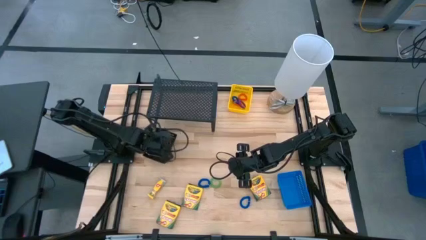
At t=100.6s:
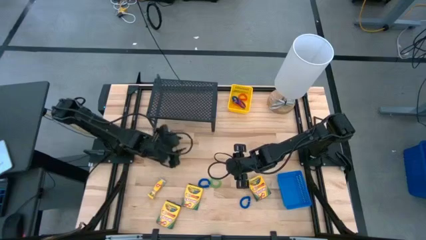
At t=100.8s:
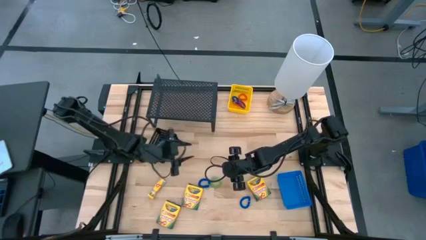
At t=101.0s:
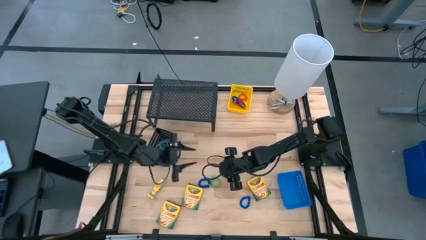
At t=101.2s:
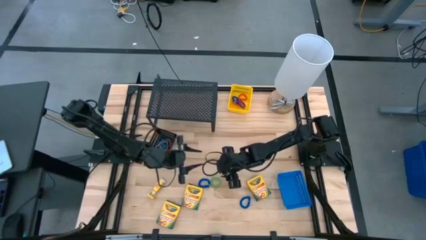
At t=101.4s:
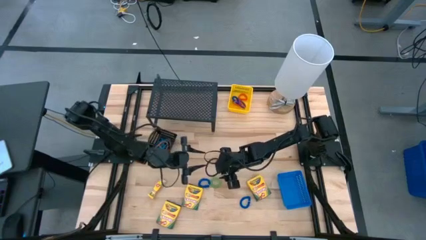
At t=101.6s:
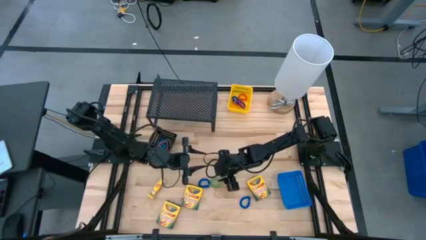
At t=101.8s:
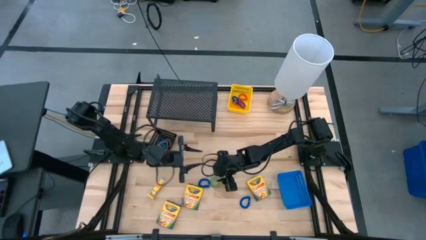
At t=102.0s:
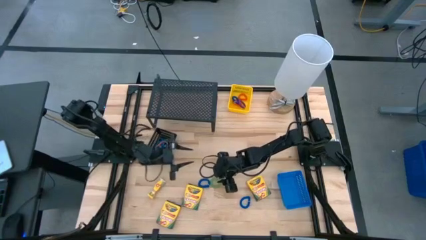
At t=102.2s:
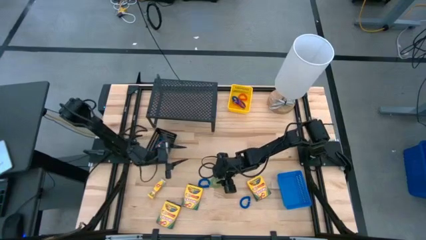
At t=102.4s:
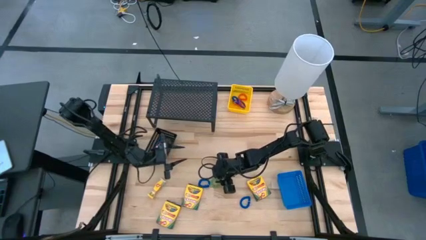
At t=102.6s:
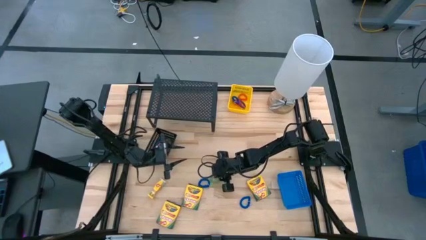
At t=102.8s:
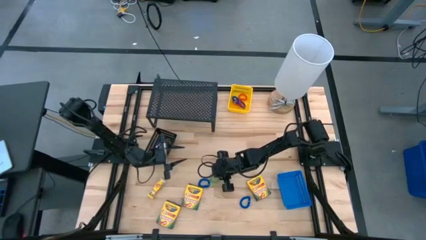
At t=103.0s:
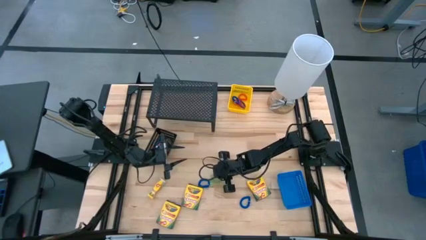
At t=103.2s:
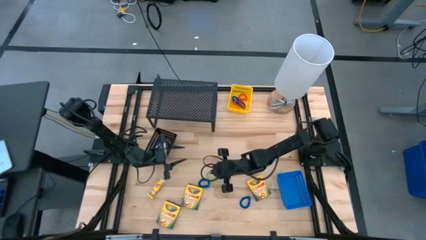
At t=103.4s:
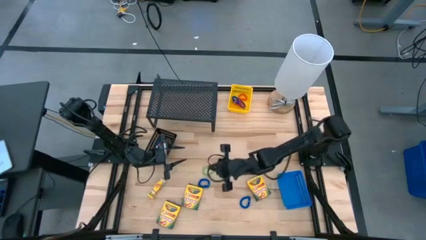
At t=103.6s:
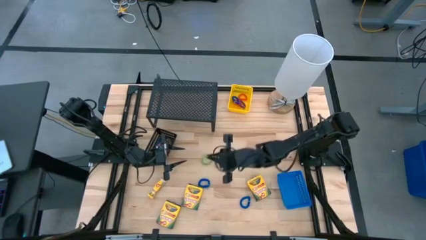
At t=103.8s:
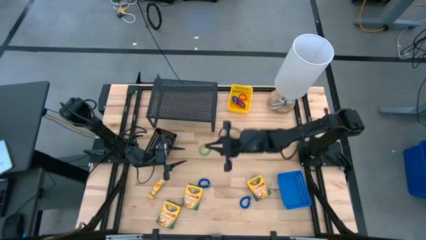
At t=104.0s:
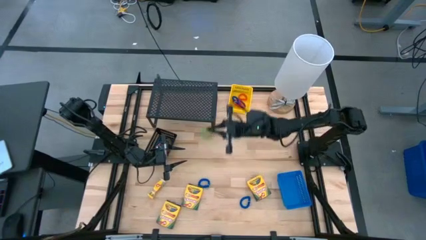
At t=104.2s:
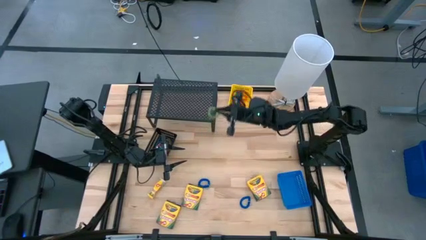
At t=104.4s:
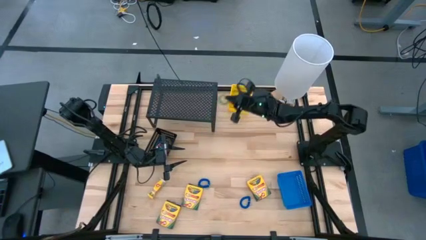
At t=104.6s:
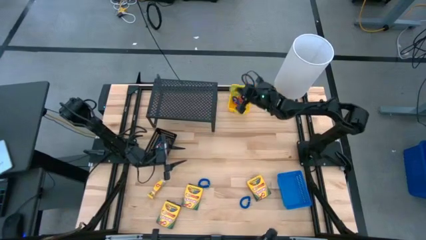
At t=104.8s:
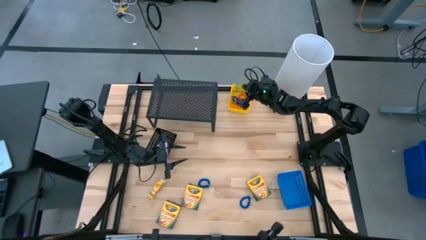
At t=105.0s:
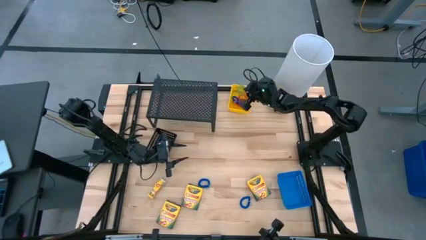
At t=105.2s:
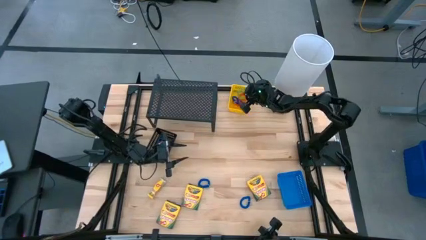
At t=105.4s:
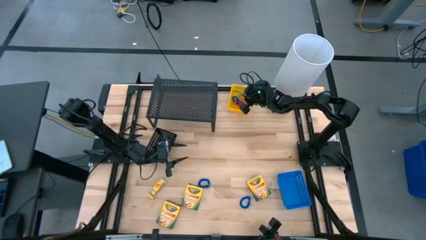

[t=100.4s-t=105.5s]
Task: Pick & Place Office Desk Supplies
Put the green spring keychain into the yellow bin

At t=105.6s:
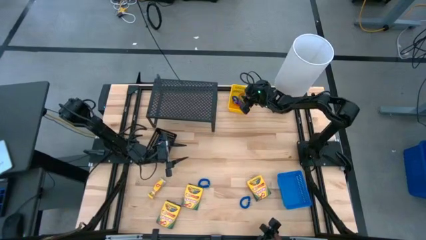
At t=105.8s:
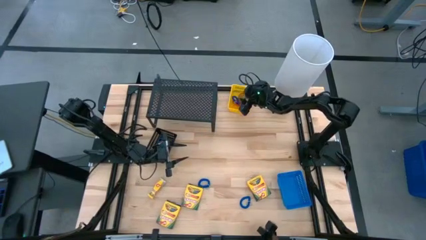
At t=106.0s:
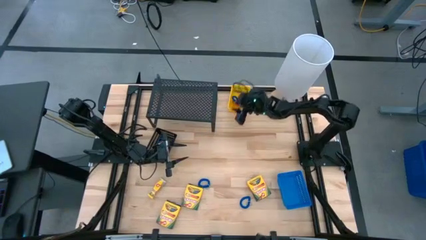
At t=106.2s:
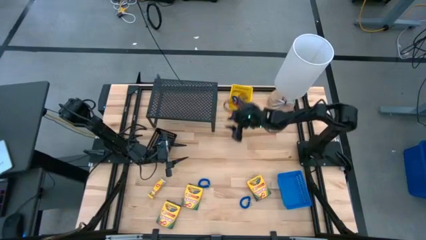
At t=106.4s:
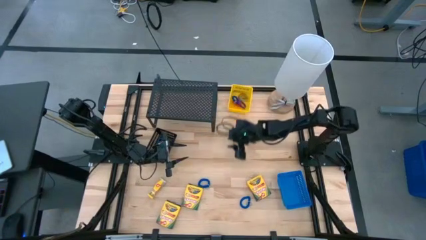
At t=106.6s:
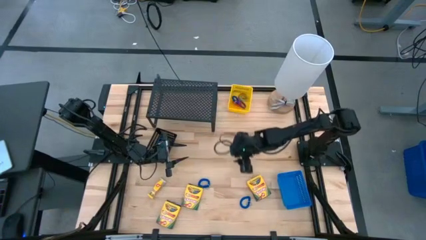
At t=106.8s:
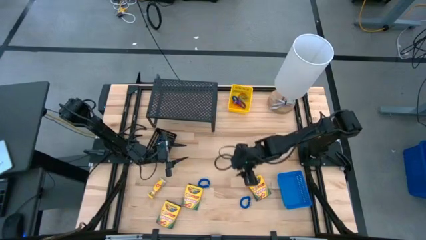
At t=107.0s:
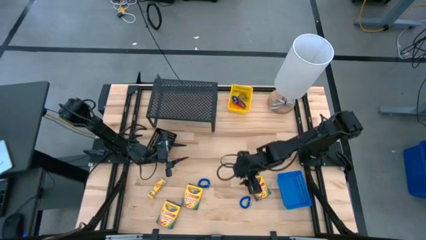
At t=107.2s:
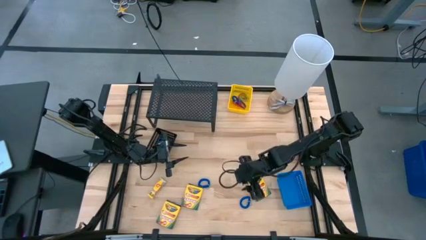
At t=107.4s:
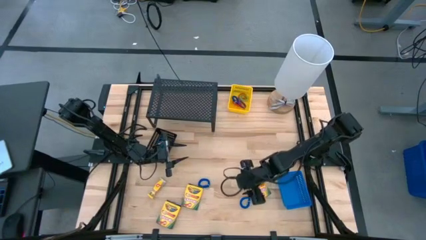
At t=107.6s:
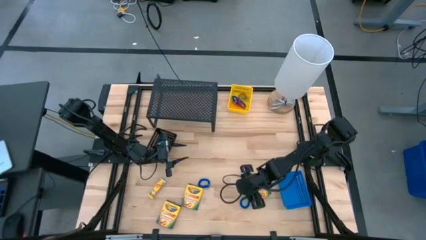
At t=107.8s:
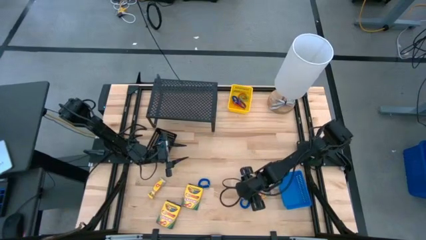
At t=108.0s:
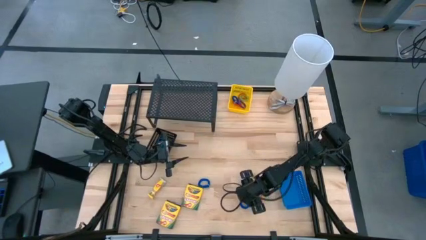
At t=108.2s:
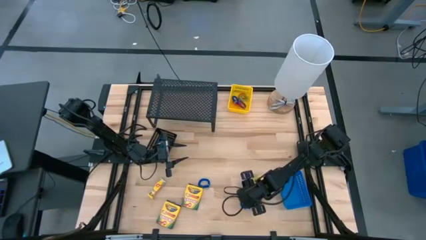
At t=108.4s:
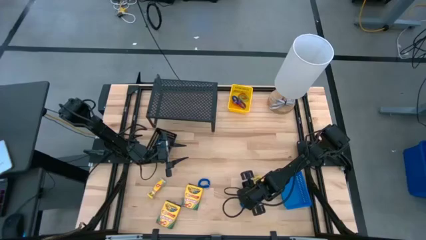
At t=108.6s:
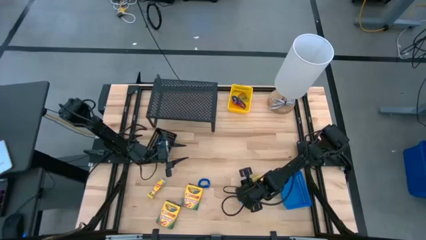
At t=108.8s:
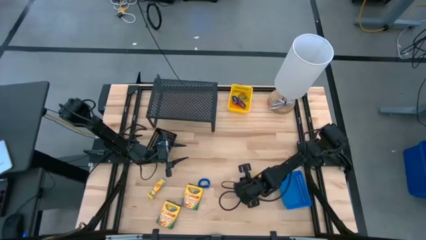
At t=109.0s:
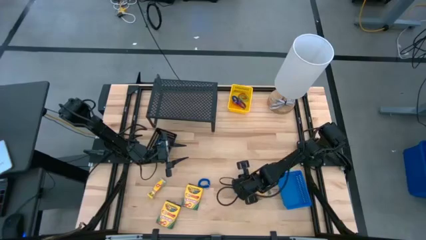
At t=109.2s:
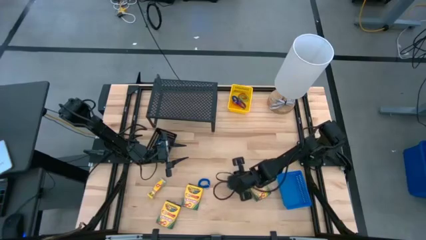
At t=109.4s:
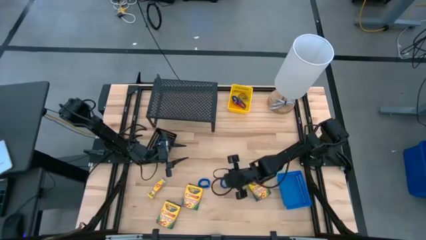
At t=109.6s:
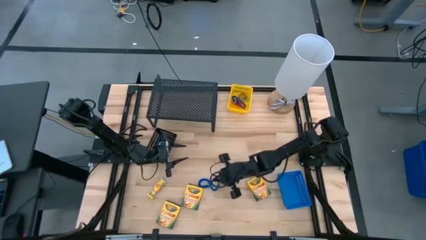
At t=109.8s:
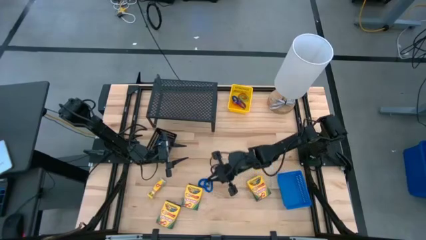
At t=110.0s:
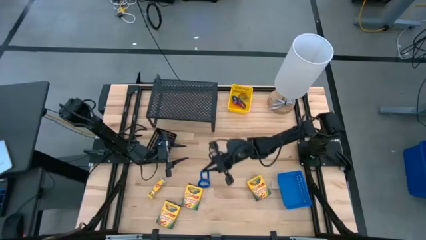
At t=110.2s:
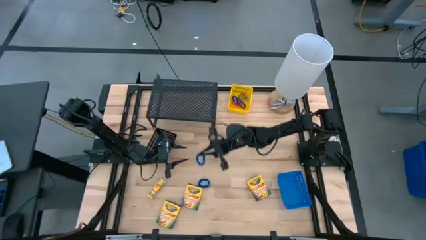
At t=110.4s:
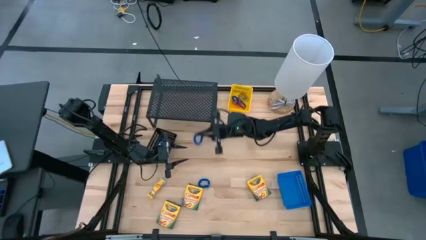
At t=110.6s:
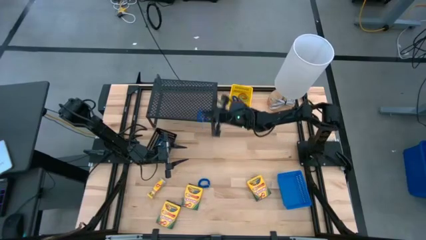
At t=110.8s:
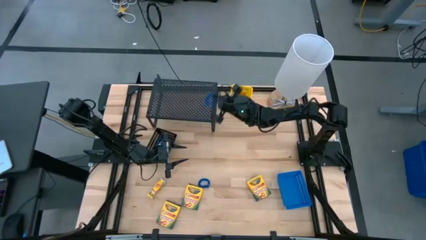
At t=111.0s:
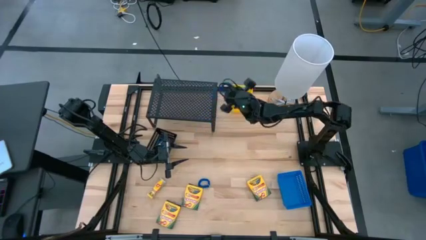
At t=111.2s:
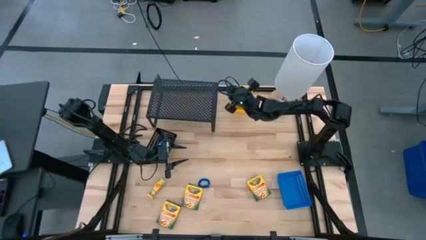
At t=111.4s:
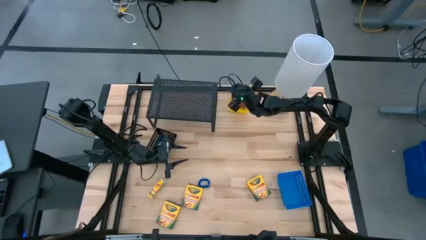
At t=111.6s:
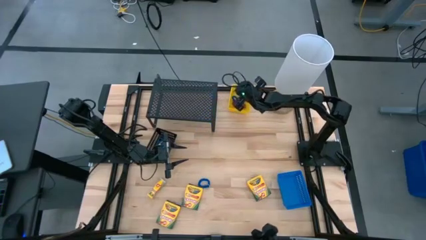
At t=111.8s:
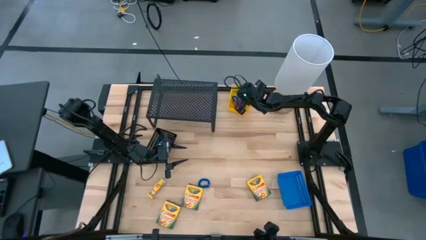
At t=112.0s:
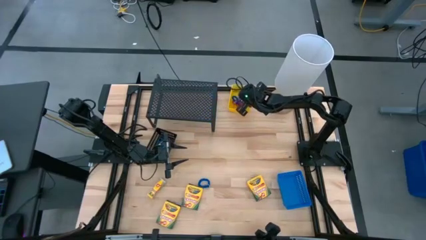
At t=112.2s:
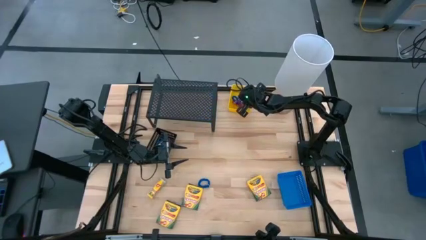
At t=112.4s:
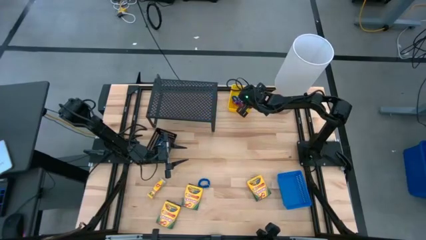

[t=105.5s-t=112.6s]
Put the bottom blue spring keychain into the yellow bin

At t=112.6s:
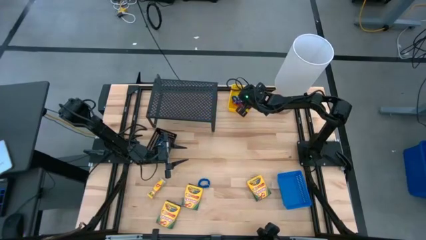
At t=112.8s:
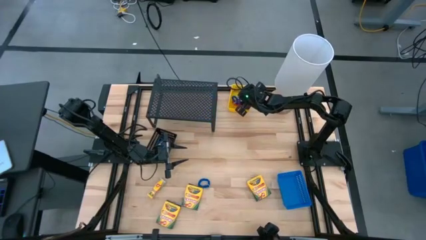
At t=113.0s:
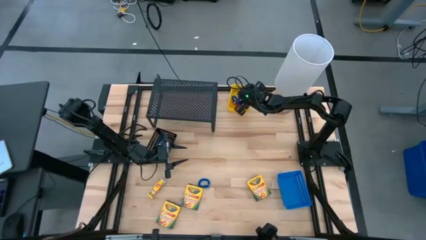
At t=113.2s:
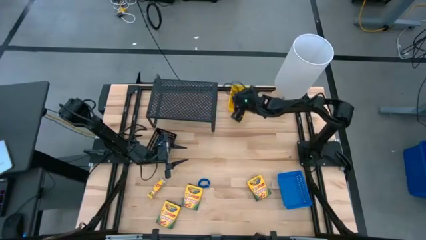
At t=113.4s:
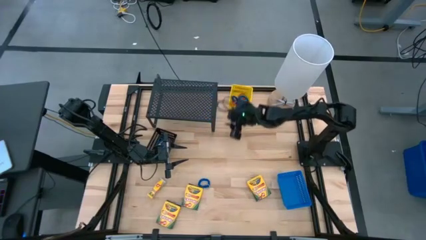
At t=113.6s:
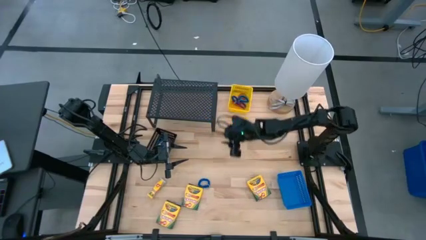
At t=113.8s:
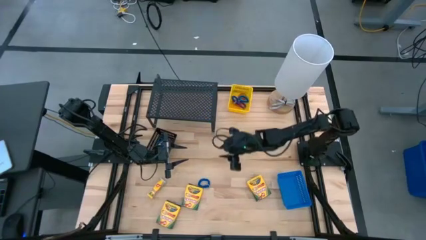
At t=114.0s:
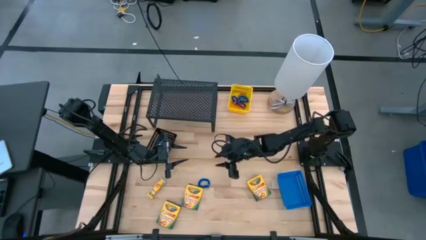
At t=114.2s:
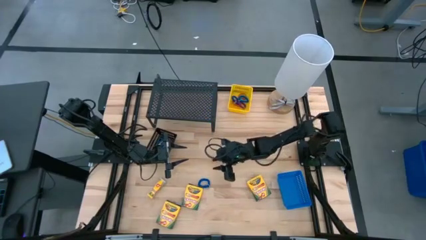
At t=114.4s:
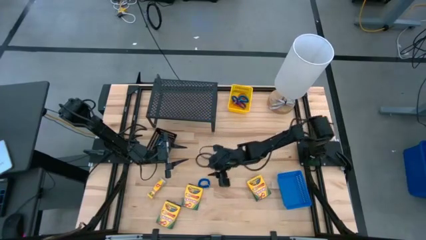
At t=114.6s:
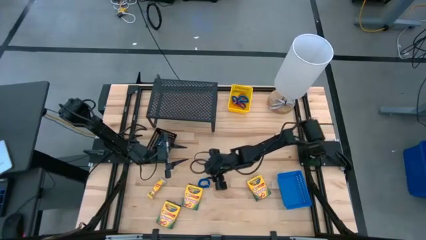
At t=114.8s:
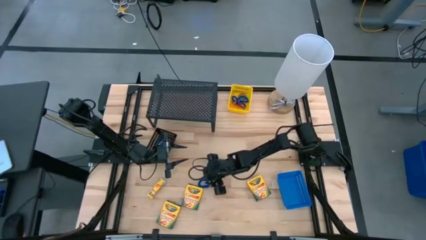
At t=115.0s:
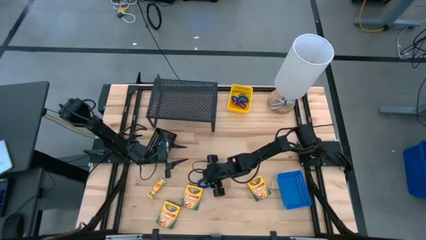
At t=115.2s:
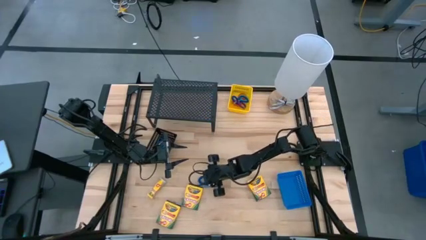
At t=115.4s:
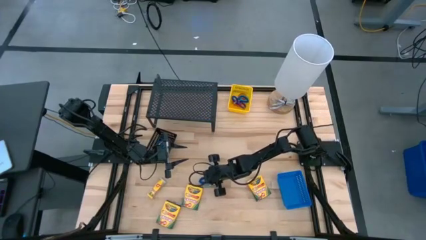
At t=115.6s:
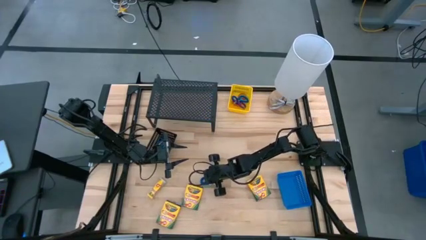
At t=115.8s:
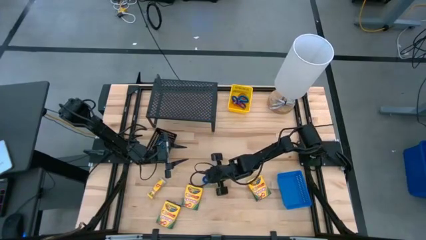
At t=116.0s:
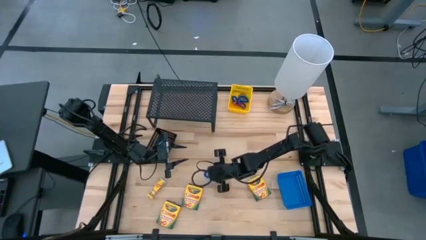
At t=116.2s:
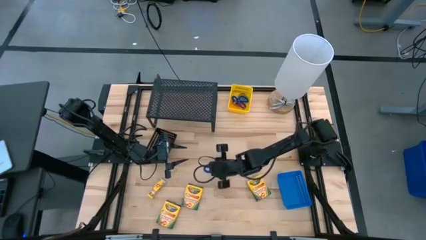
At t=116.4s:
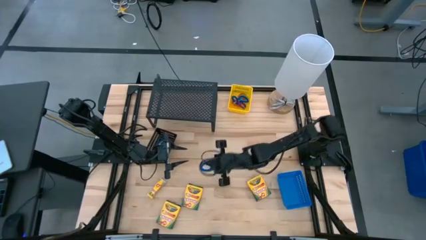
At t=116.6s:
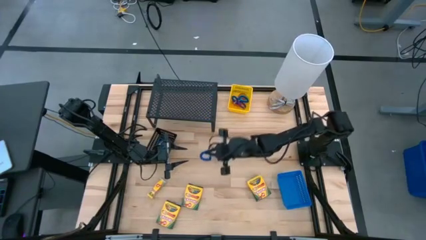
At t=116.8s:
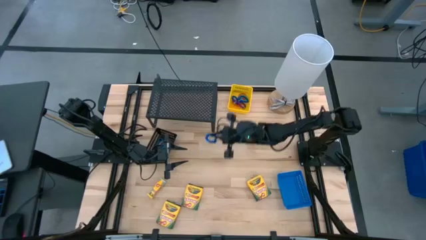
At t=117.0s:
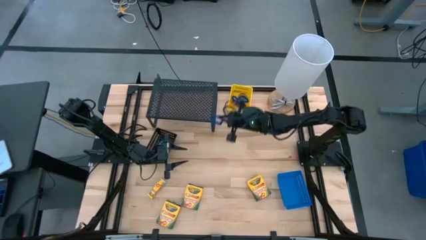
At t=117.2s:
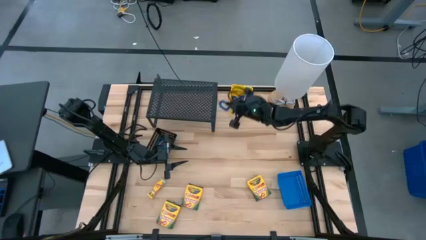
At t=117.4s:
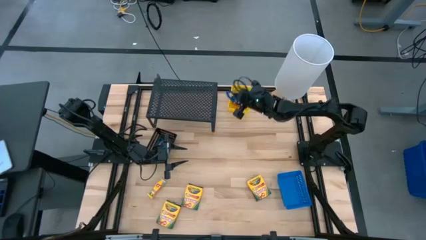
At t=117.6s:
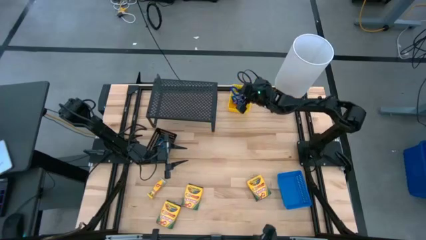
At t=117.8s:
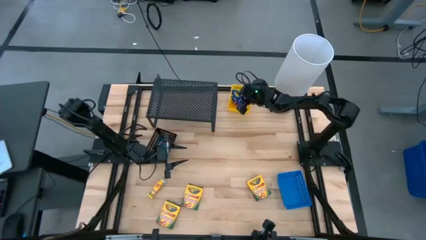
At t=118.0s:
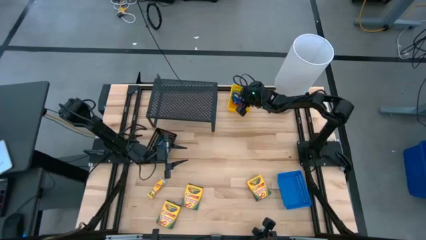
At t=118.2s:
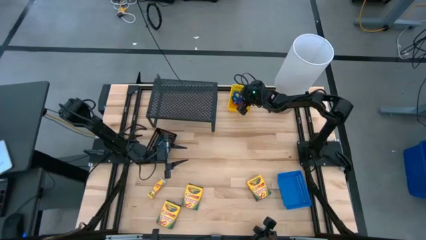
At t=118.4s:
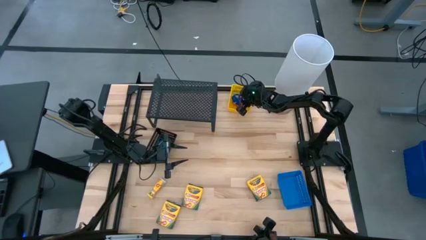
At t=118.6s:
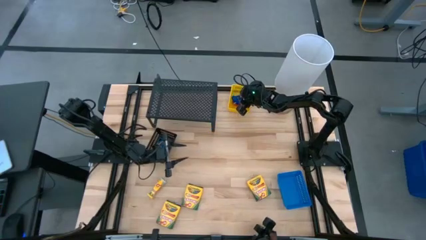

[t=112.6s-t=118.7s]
Put the blue spring keychain into the yellow bin
